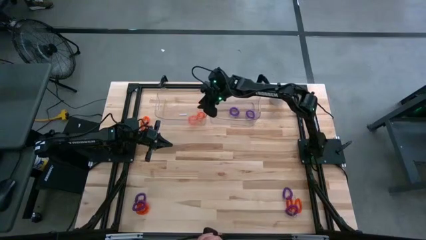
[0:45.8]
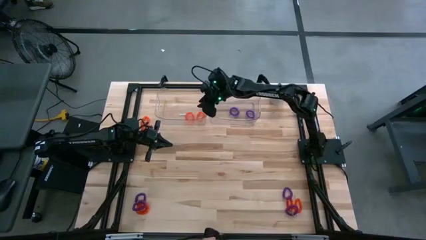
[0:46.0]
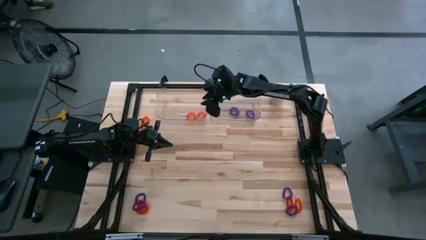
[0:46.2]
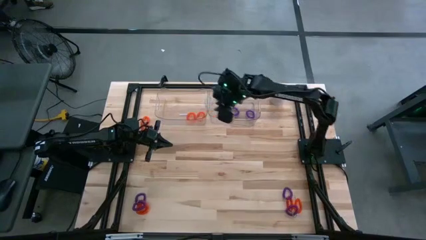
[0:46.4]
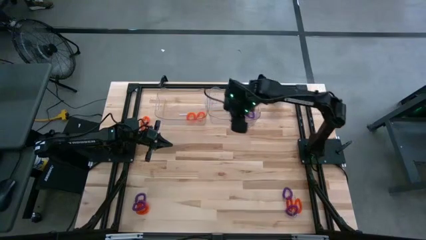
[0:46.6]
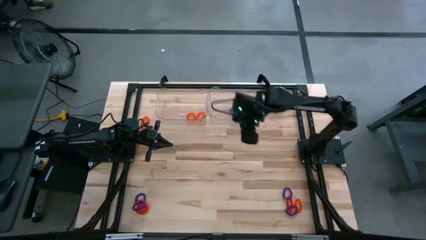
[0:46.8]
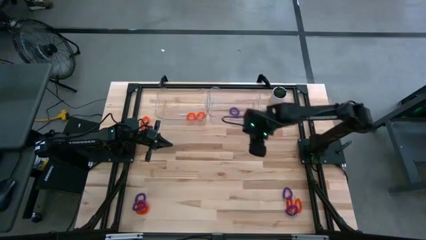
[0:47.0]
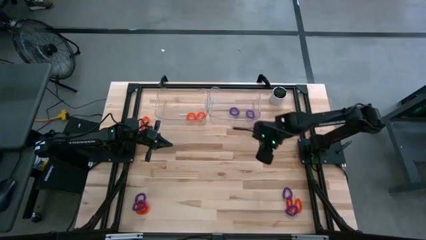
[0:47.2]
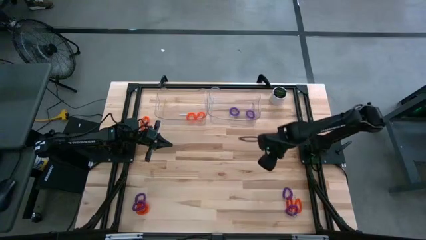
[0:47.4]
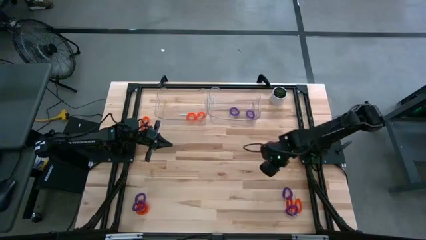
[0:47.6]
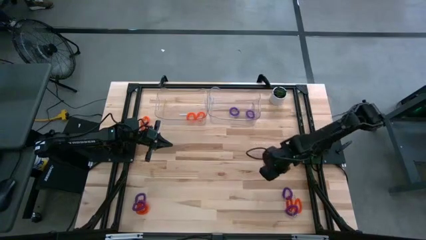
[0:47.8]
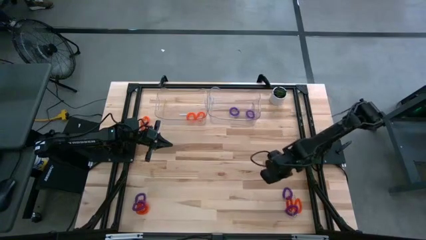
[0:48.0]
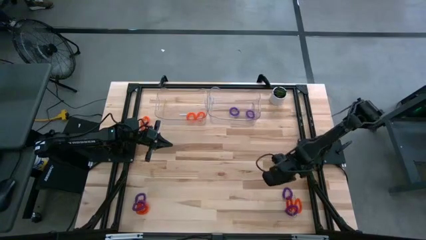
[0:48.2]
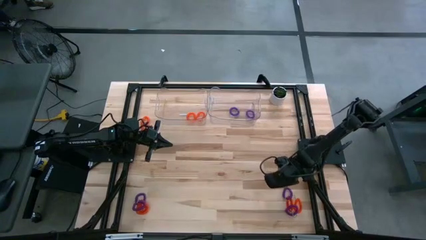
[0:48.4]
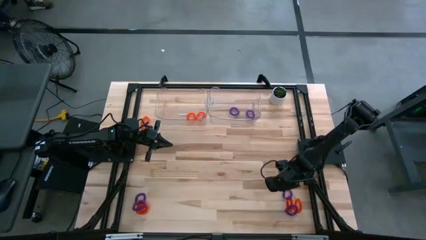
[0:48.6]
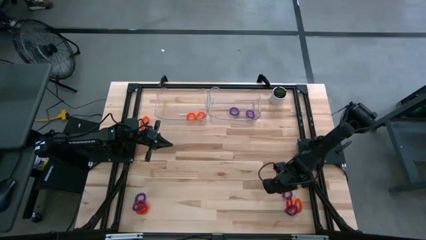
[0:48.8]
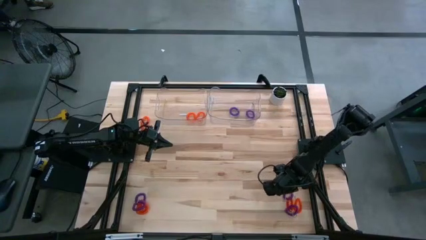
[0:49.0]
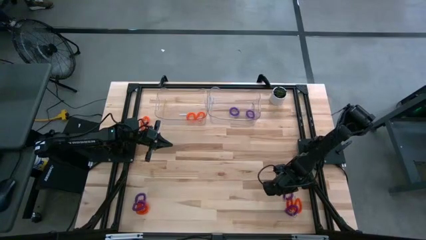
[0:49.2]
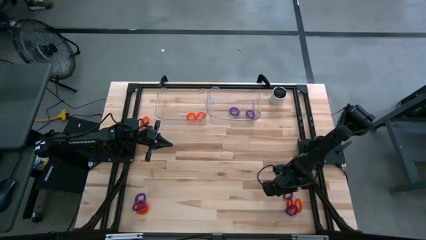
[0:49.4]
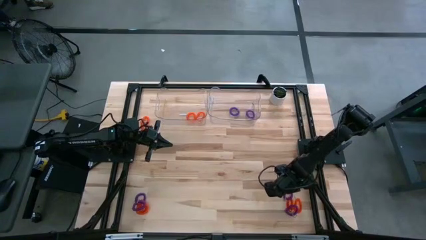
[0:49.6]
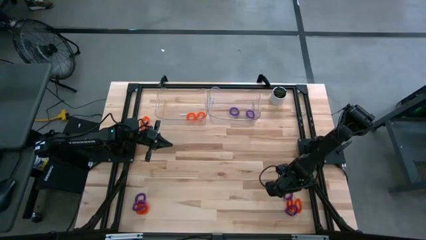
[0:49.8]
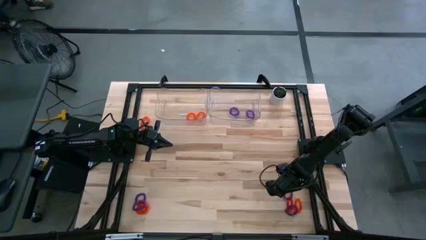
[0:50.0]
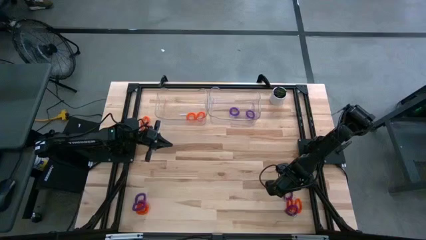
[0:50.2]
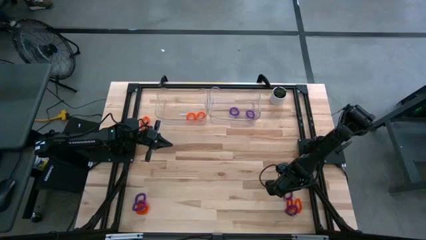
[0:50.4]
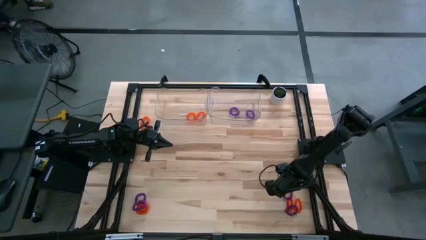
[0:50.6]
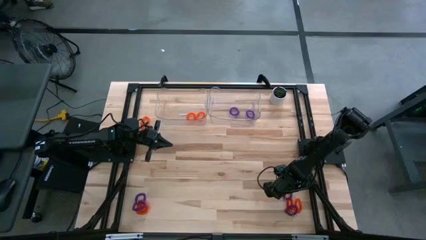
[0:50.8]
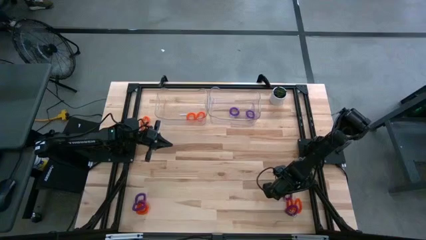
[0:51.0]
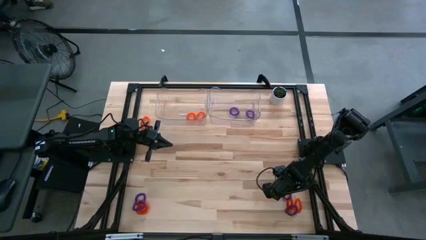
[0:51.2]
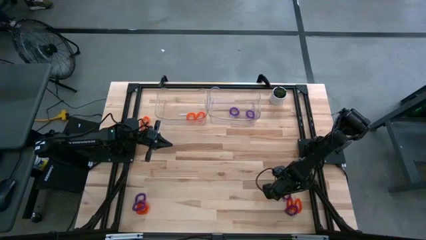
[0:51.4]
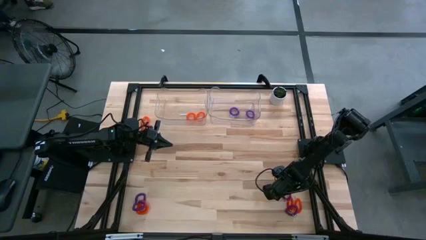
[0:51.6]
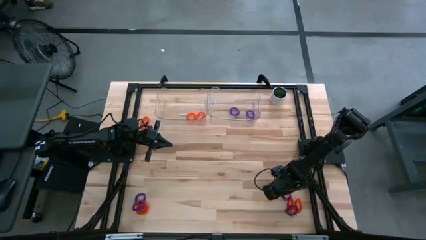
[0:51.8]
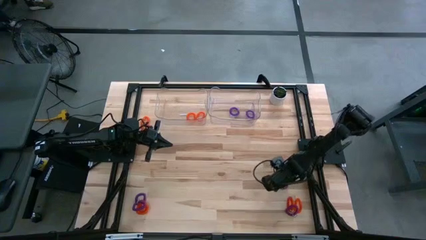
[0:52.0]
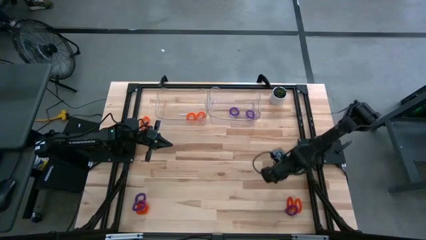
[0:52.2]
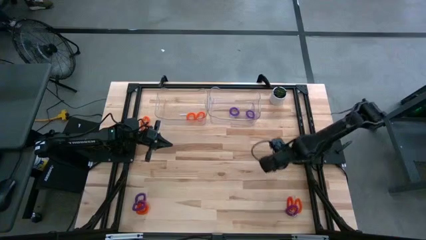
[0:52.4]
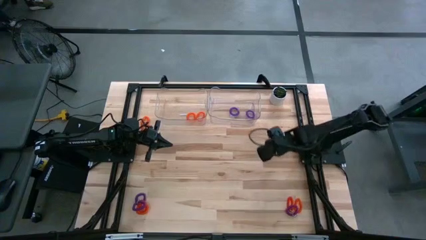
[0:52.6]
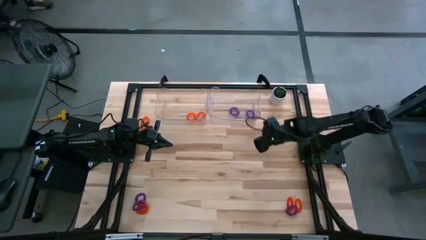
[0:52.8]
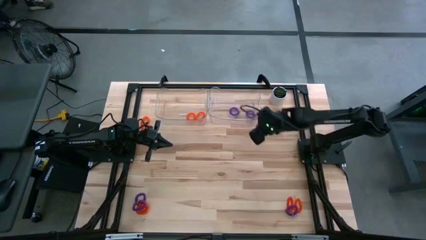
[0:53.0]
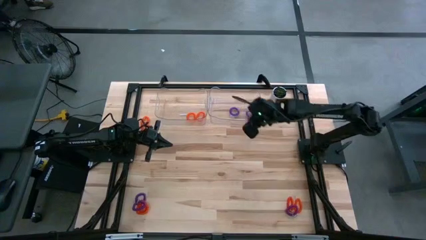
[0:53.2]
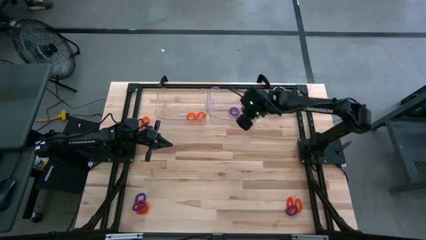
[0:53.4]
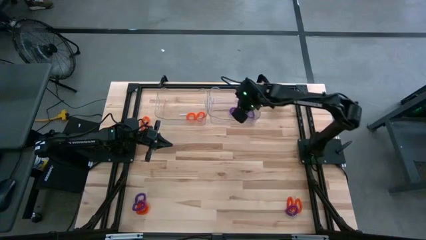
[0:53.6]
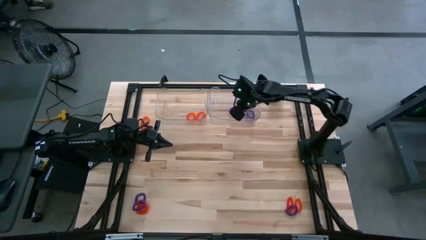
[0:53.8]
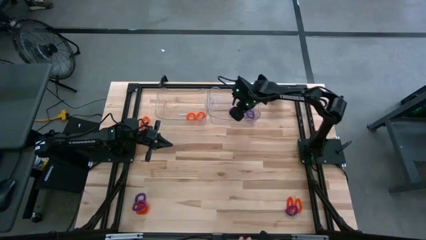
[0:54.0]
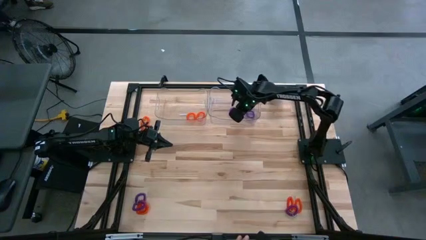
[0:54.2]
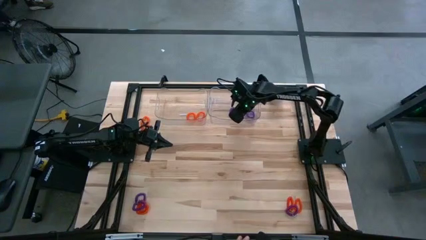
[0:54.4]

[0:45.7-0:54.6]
Task: Sort spring keychains
Put the violet spring keychain into the right transparent bin

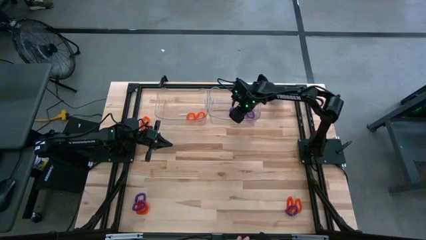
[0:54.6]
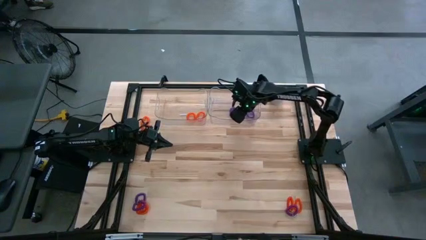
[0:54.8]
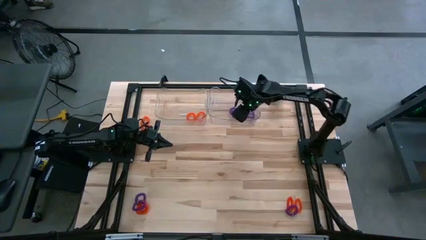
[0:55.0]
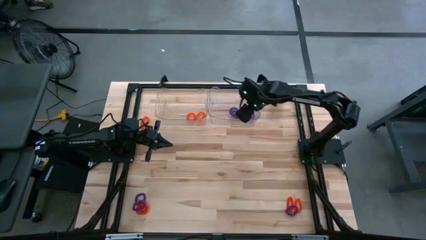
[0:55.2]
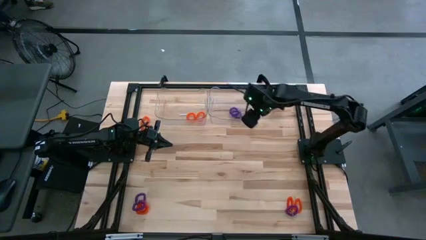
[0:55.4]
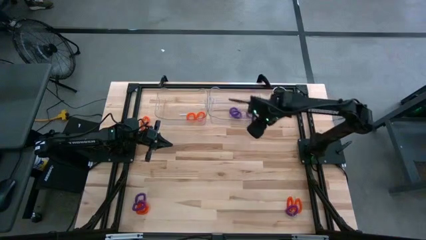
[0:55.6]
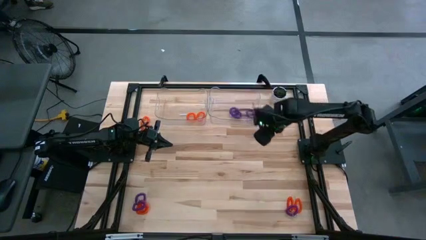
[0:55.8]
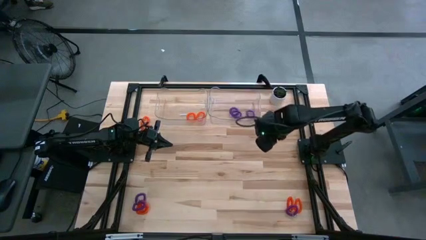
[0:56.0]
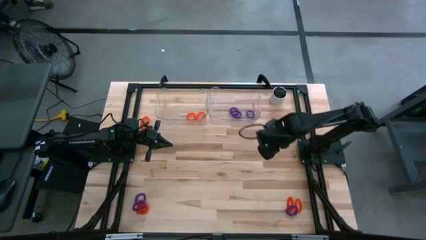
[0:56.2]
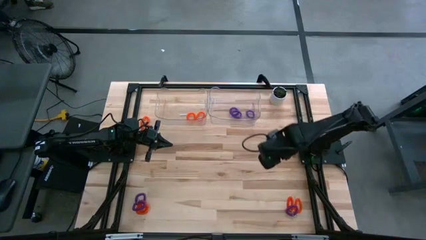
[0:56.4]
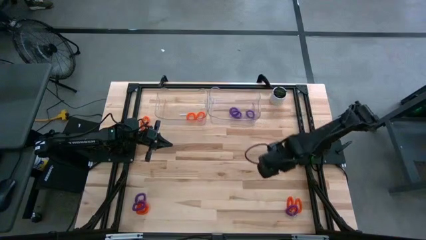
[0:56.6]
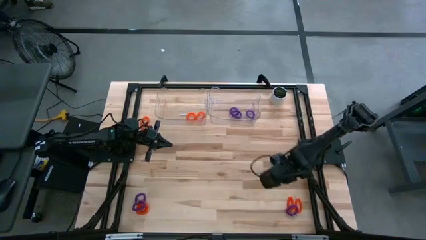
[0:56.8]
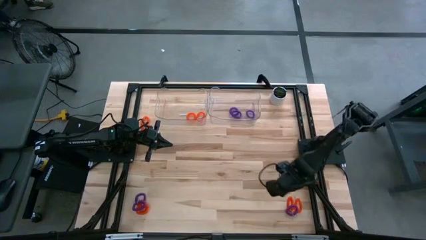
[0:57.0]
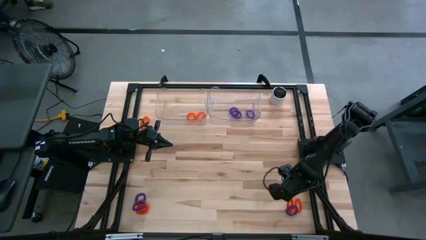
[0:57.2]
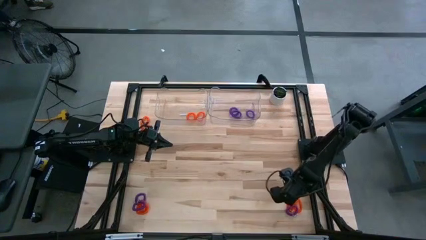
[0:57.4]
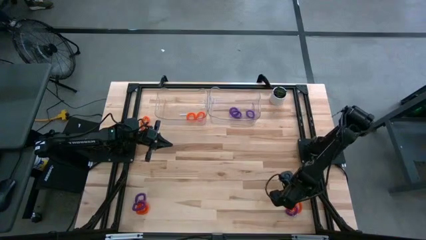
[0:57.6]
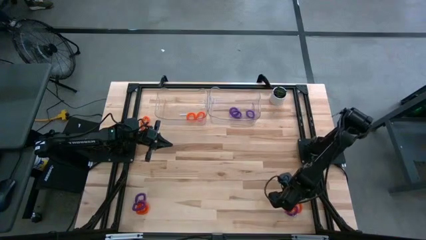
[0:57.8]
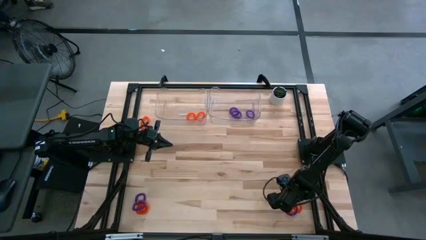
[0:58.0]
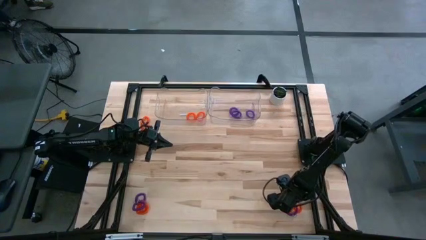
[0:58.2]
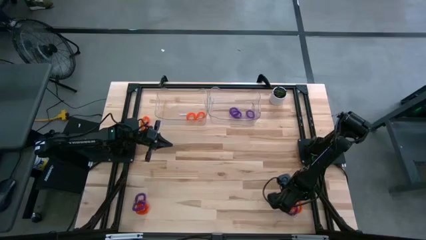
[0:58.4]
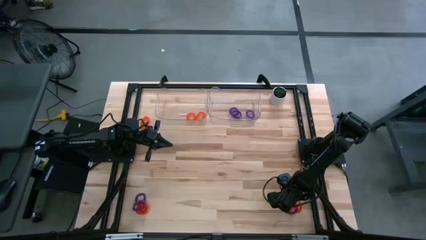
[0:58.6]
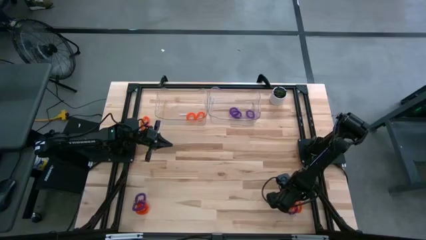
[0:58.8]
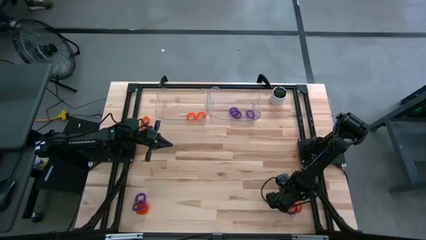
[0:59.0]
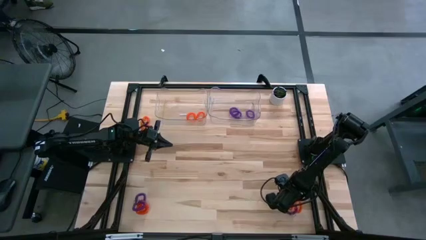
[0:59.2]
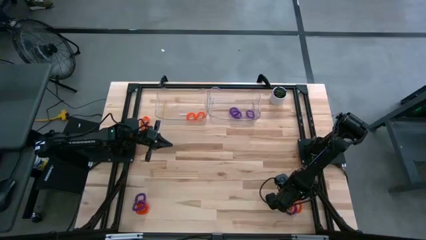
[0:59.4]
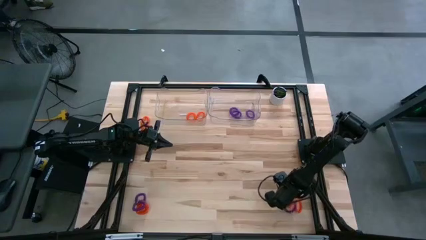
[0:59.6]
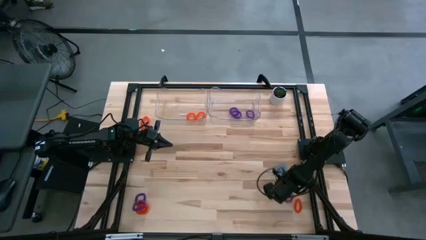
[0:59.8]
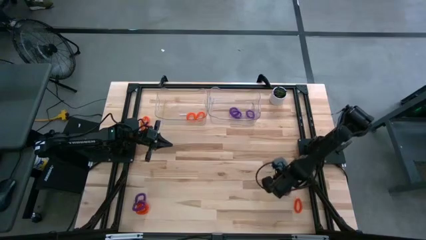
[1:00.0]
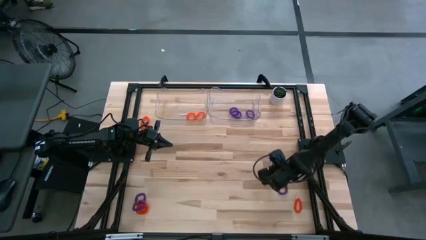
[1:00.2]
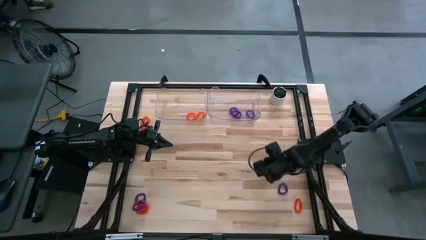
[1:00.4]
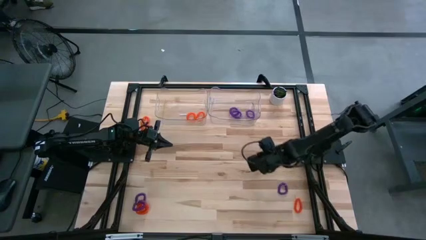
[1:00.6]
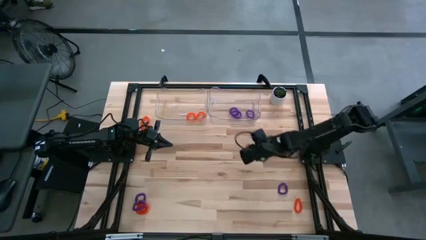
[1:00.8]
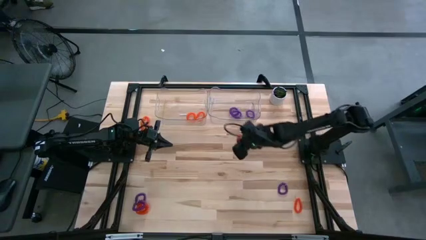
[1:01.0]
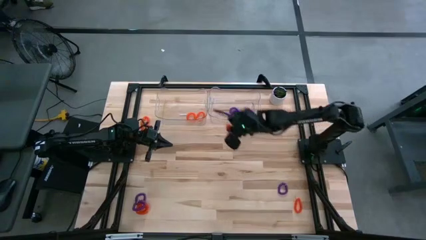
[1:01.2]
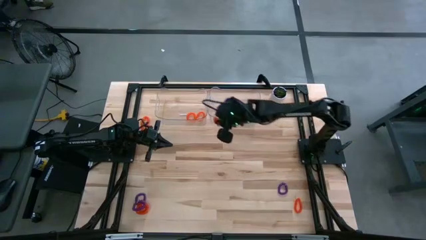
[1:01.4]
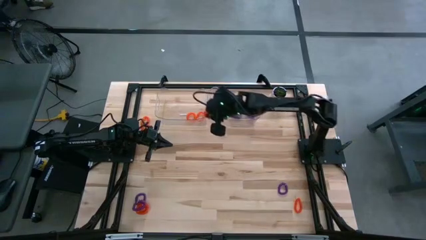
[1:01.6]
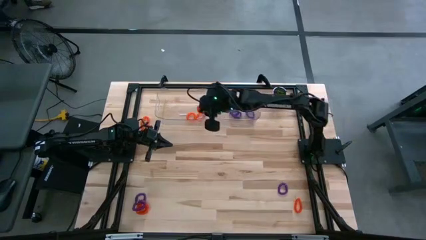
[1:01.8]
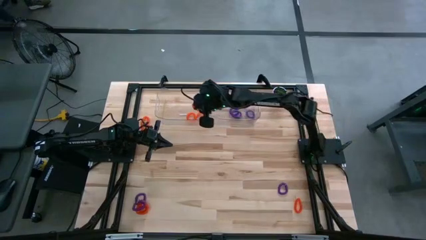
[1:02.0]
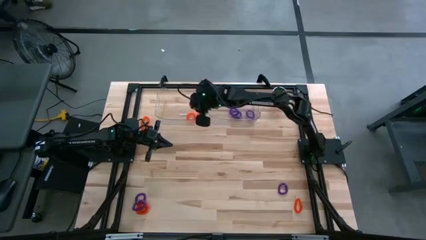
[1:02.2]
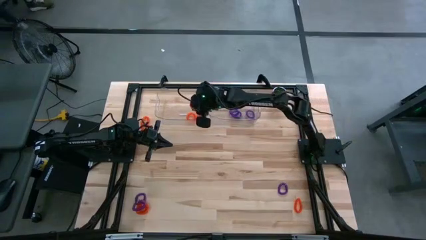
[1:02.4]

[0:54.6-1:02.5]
Put the orange spring keychain into the left transparent bin
